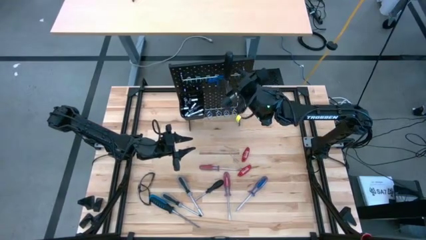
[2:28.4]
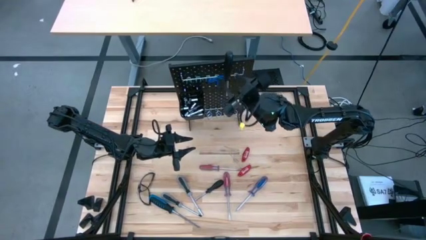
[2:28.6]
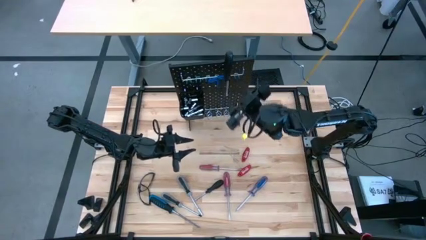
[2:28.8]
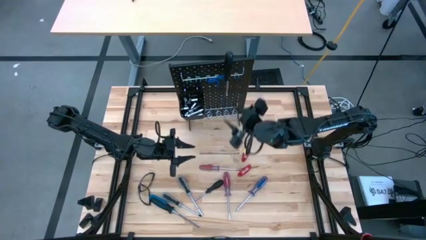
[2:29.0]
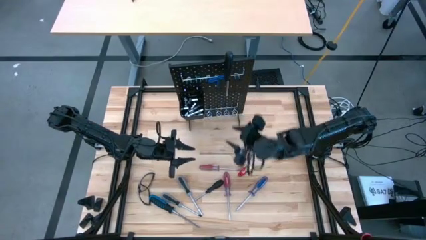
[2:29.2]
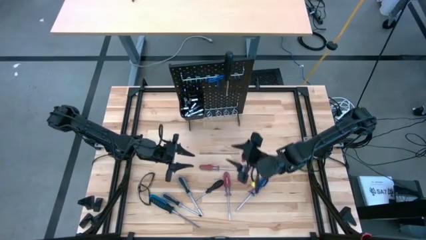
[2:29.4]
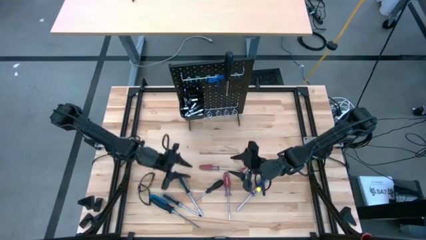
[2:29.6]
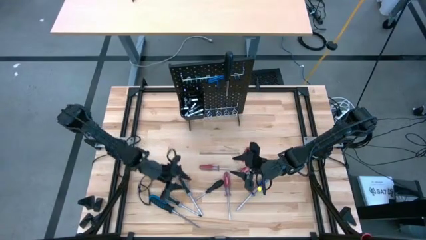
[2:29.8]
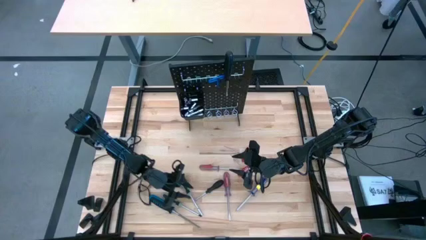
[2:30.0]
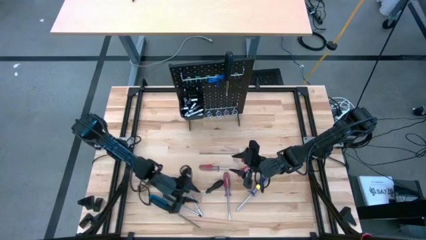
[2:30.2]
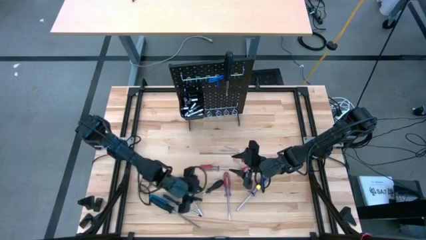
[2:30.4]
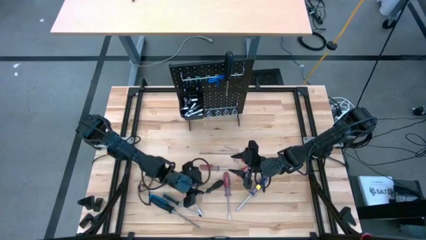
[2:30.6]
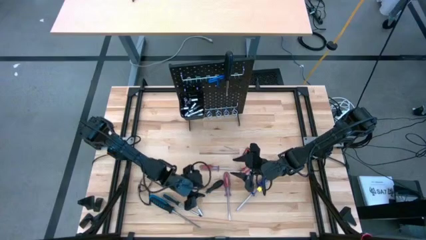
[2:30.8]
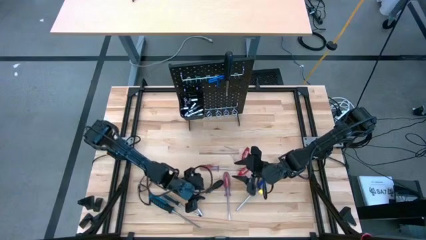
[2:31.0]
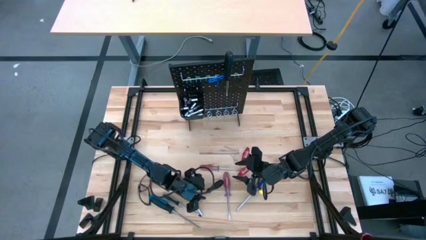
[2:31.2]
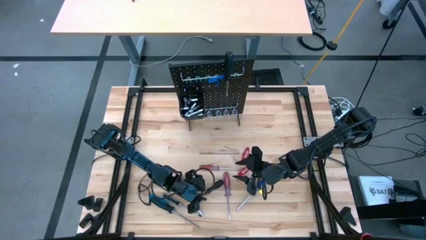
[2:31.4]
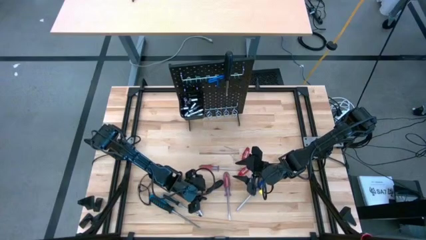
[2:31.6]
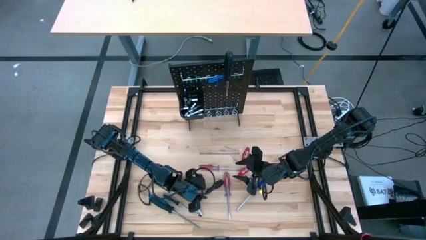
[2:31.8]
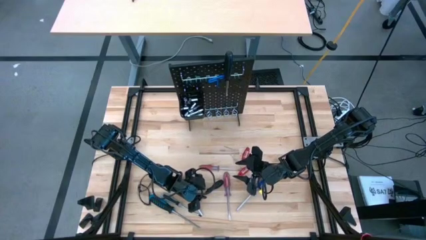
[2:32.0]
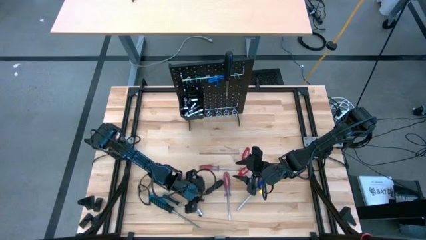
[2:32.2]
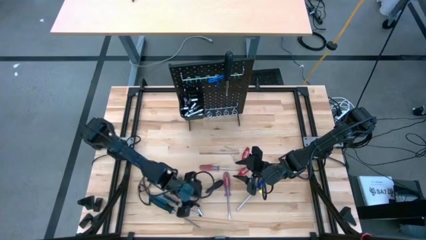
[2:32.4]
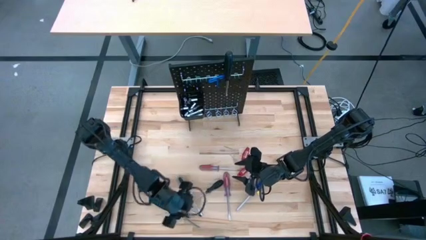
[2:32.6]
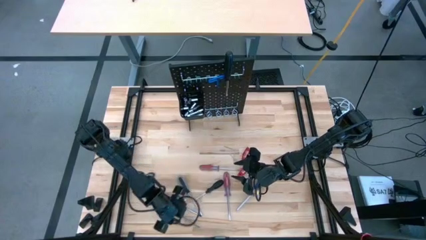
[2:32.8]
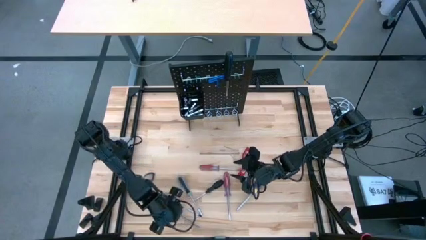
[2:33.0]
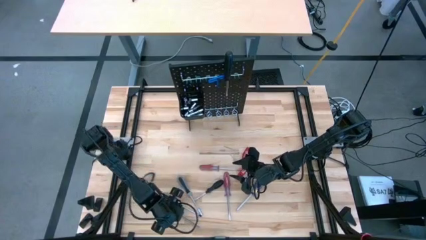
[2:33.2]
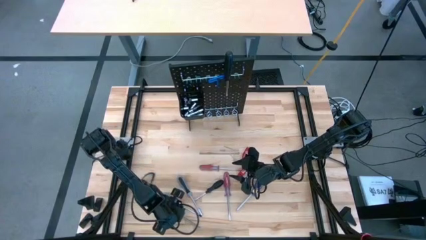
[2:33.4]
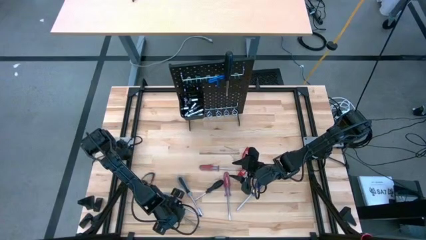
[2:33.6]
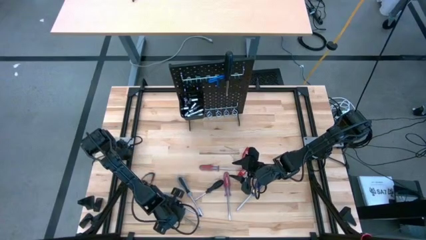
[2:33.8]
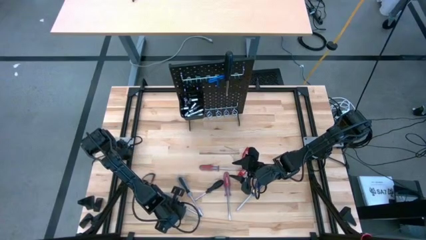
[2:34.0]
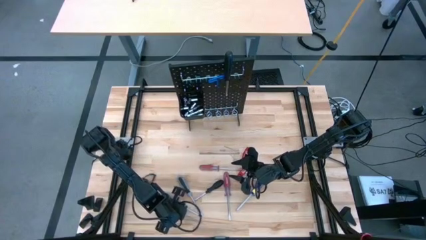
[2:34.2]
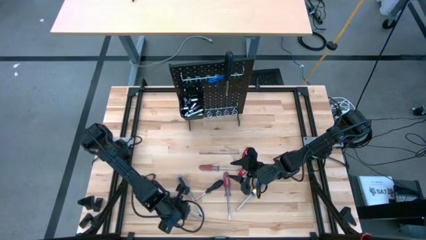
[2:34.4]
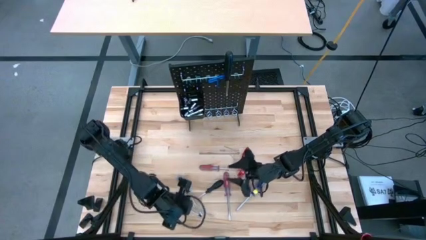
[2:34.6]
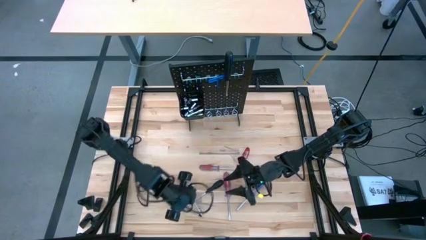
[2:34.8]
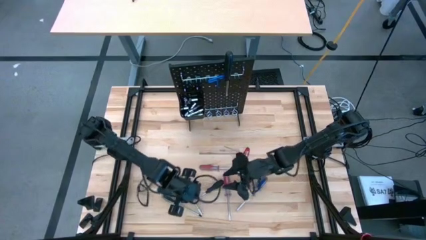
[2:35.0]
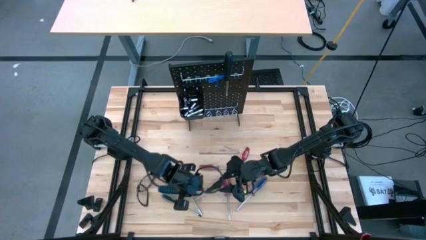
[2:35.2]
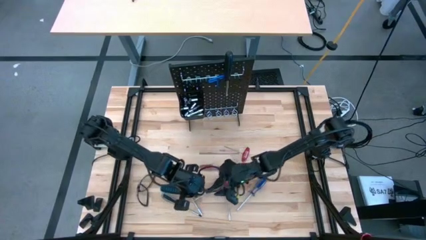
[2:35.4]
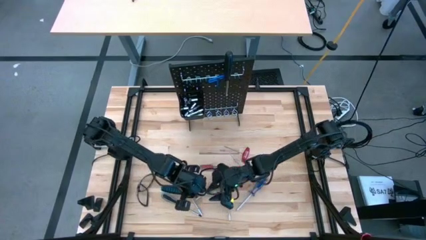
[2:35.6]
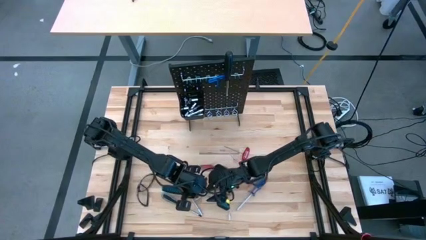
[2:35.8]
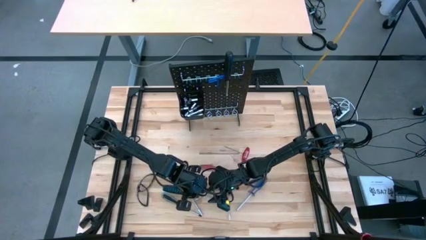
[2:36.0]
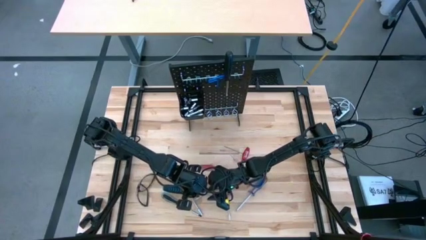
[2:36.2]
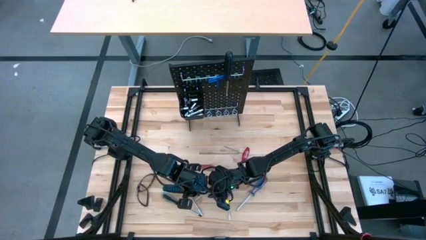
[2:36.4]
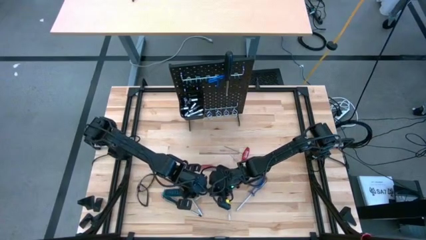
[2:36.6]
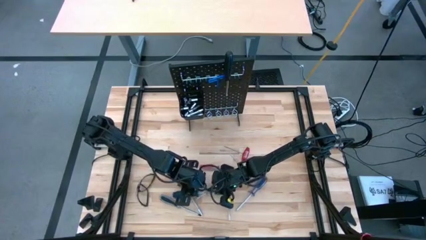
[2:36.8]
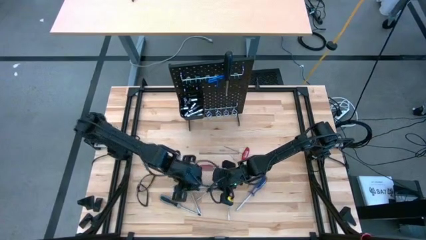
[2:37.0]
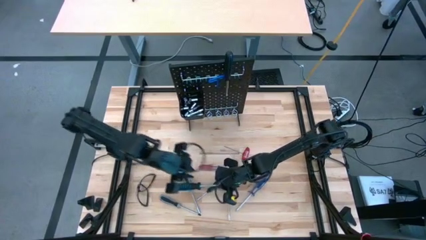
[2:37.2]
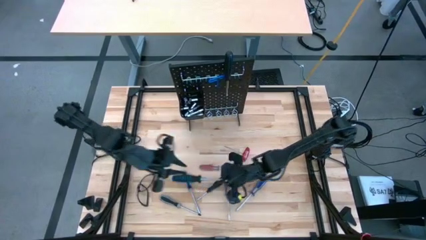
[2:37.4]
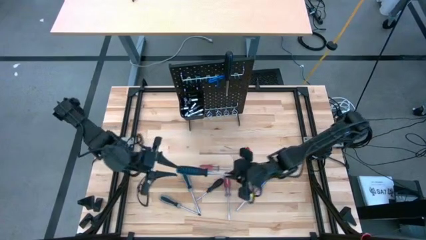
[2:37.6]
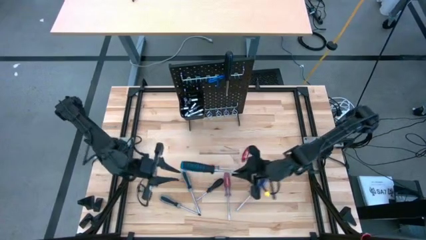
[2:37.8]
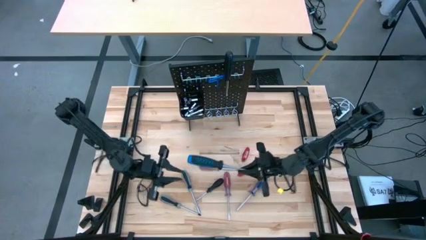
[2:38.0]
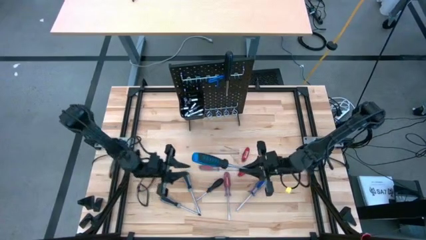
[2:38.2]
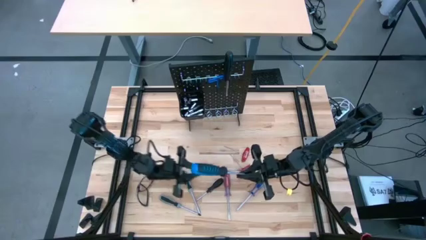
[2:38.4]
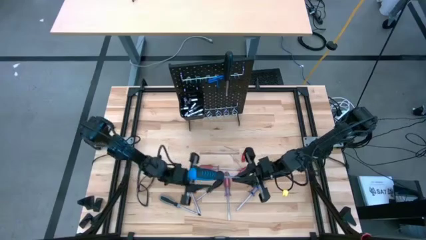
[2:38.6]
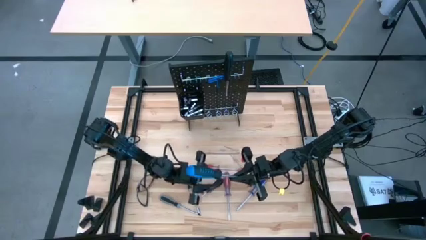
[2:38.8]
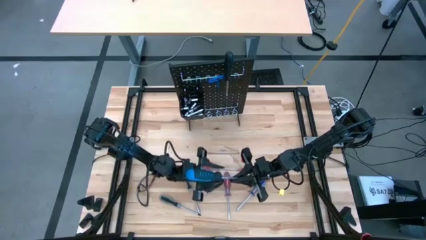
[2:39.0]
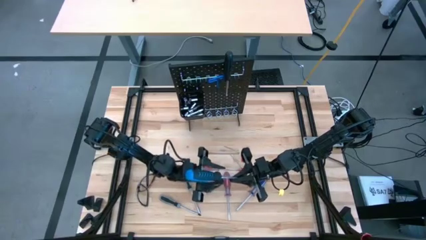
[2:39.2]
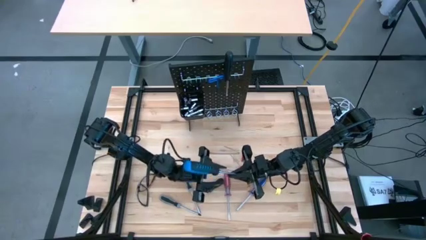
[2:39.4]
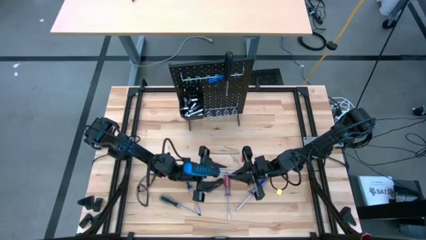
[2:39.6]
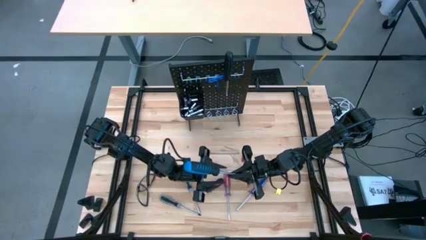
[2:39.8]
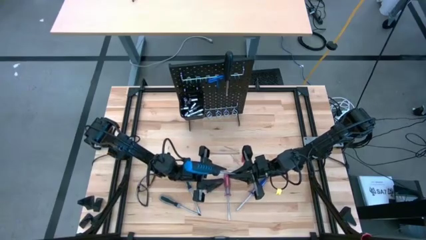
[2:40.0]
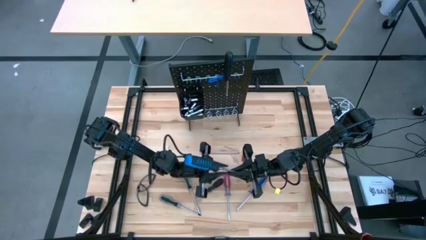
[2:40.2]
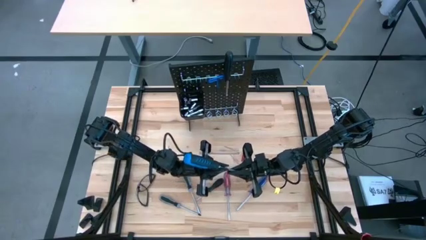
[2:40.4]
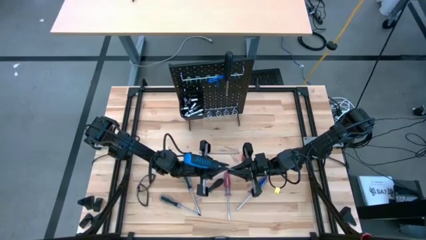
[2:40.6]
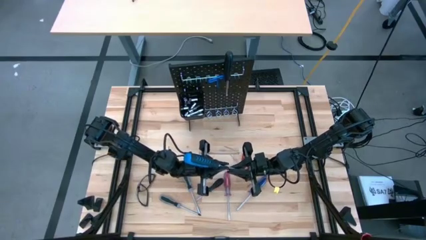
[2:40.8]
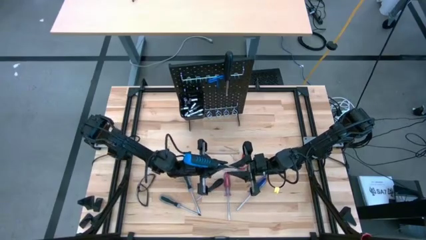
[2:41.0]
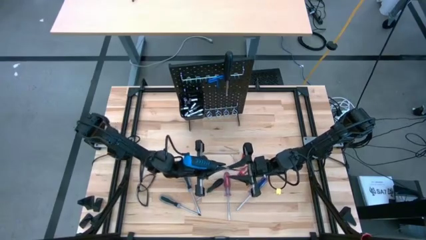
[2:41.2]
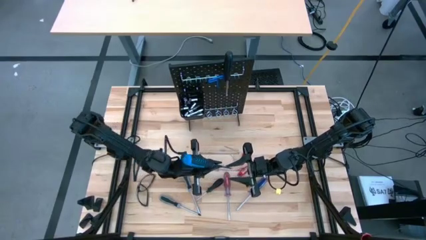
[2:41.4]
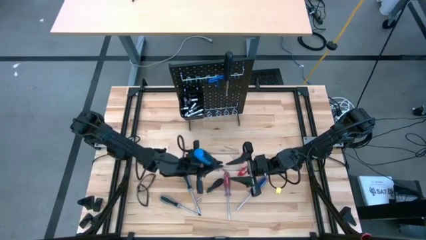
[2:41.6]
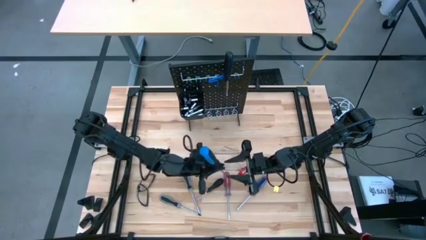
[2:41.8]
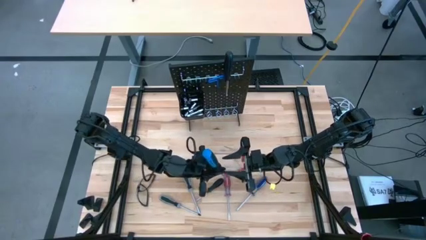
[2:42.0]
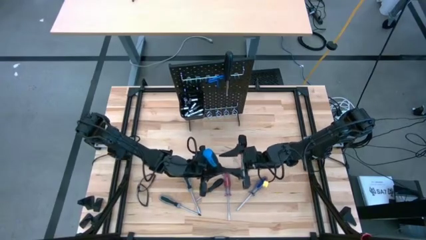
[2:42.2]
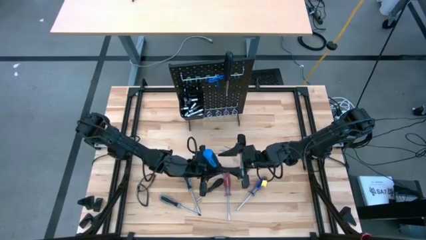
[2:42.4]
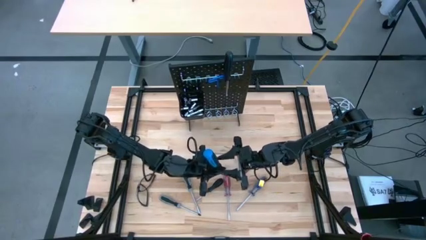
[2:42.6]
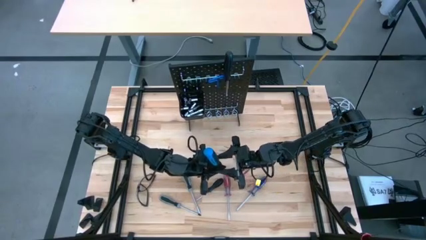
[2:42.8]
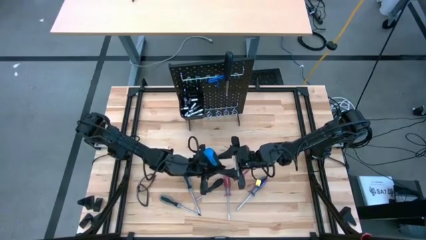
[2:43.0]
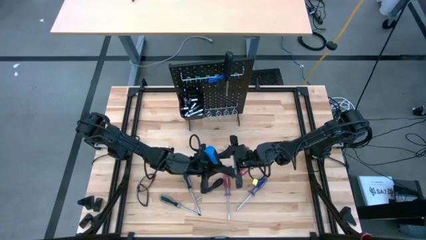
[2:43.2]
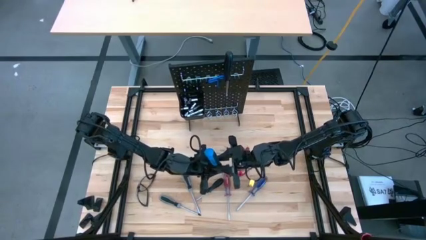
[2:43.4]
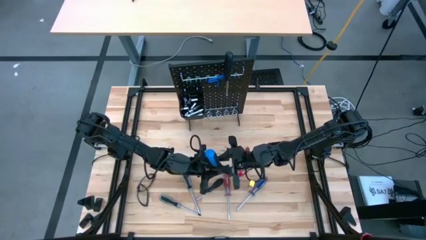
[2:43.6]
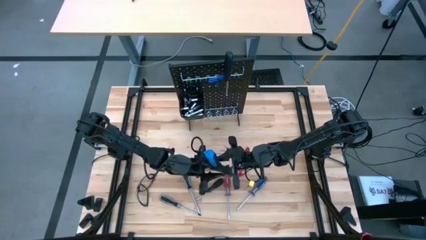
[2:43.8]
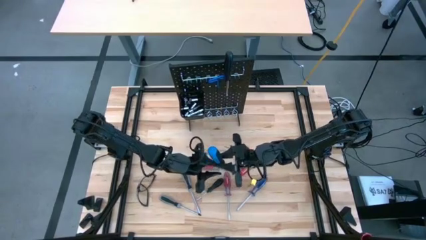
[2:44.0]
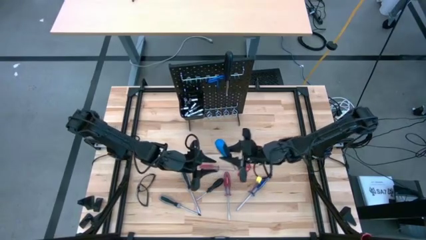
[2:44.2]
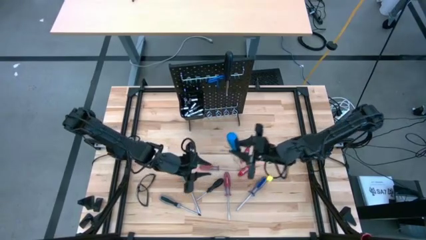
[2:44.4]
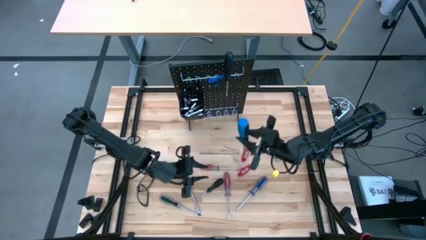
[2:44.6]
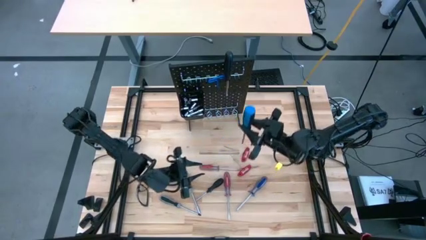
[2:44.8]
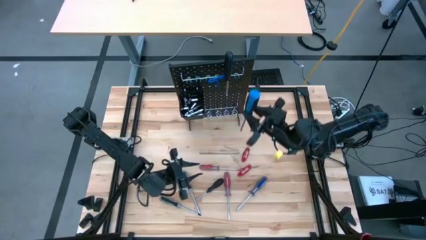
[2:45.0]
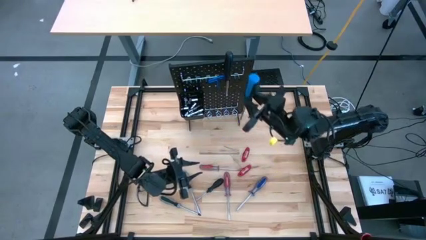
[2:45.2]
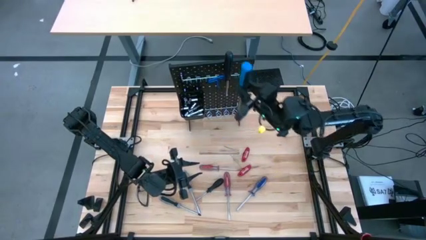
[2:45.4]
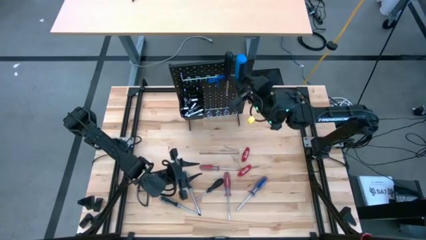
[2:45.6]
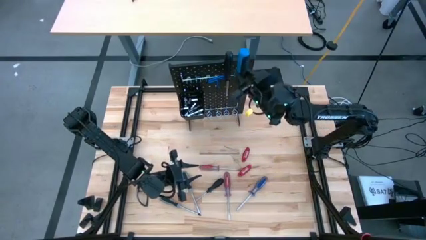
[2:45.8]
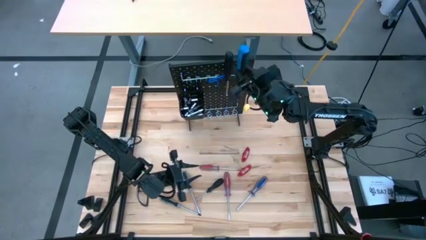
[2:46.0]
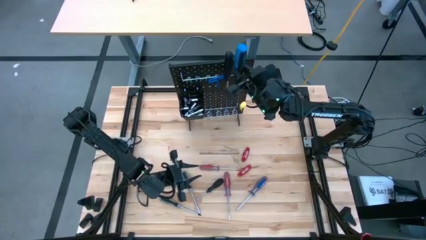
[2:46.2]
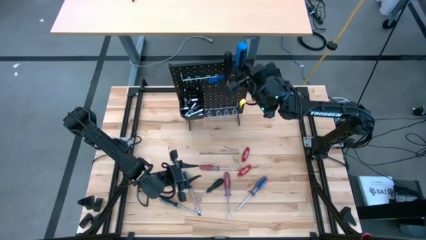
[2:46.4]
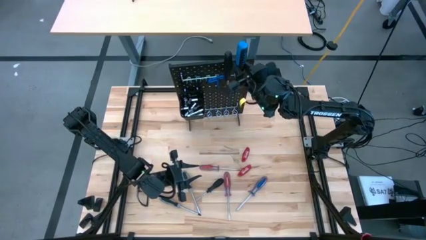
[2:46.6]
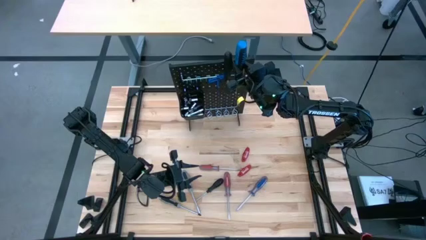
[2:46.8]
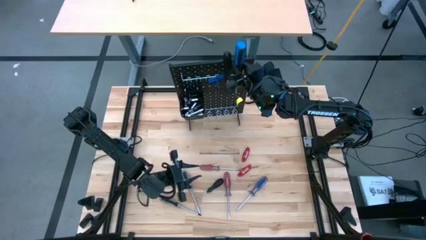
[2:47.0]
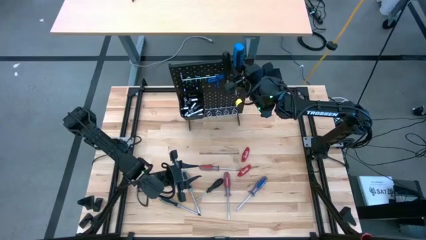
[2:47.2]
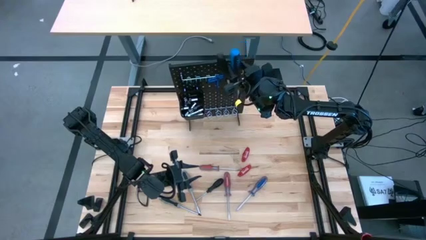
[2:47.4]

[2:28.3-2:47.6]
Task: Hang tools onto peg board
Hang the blue-black screwdriver on the pegboard
